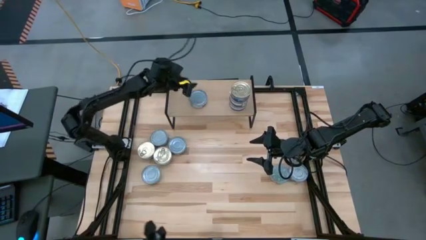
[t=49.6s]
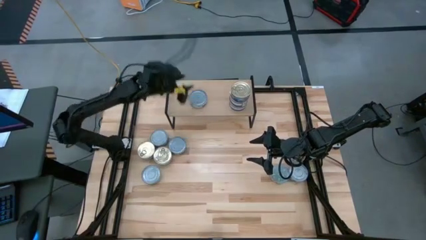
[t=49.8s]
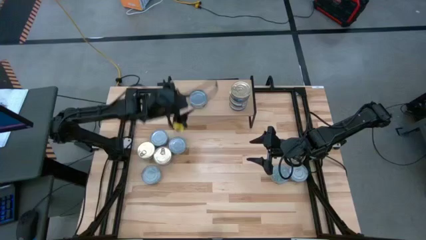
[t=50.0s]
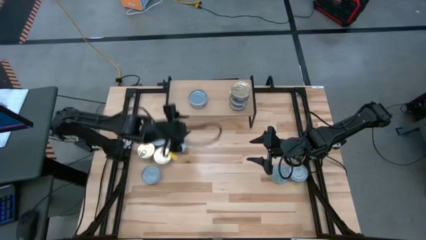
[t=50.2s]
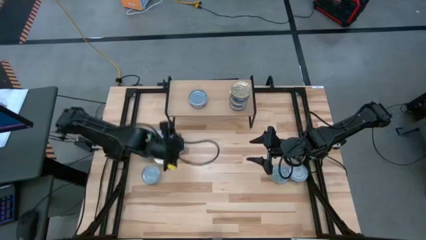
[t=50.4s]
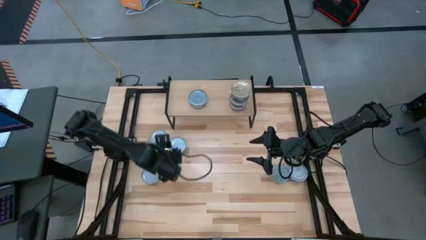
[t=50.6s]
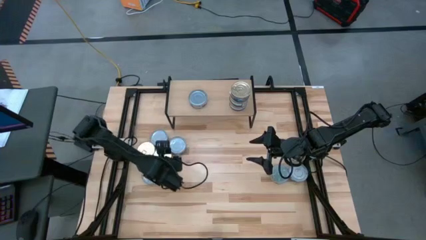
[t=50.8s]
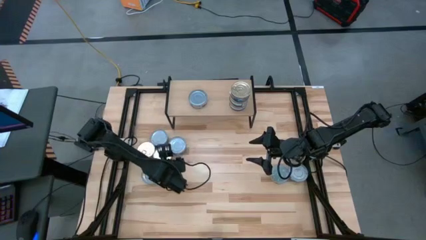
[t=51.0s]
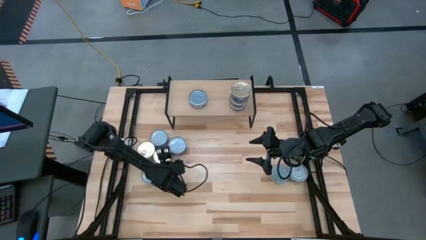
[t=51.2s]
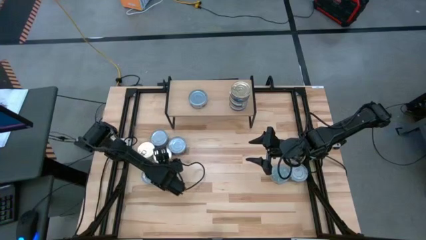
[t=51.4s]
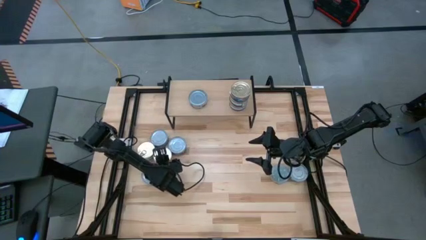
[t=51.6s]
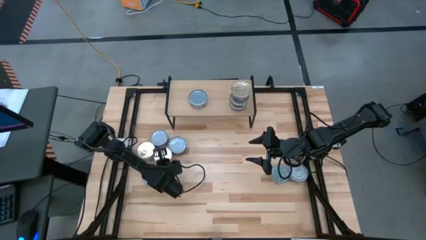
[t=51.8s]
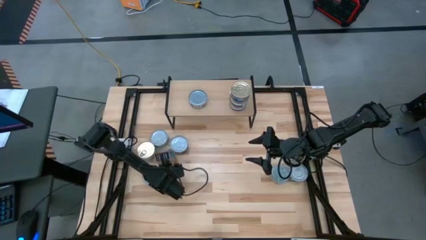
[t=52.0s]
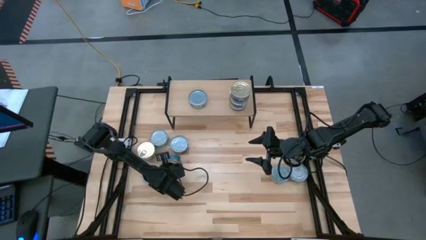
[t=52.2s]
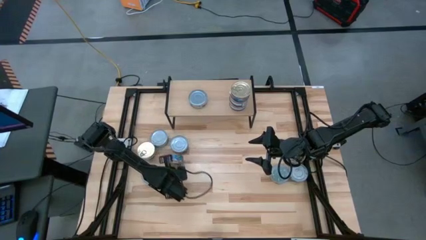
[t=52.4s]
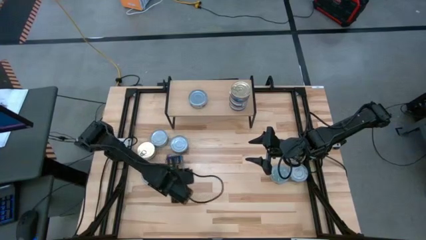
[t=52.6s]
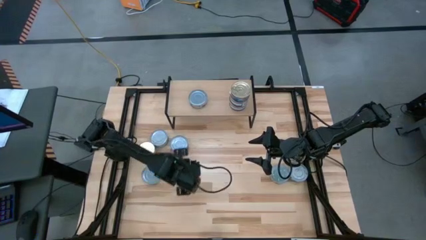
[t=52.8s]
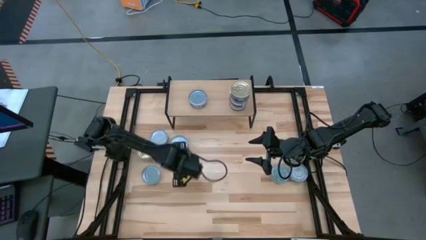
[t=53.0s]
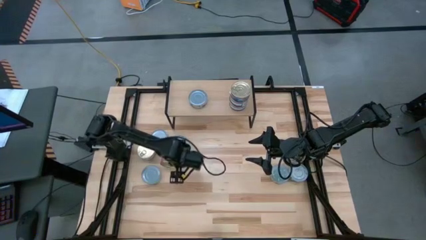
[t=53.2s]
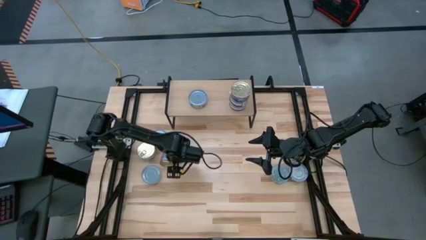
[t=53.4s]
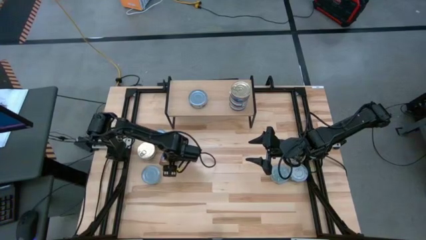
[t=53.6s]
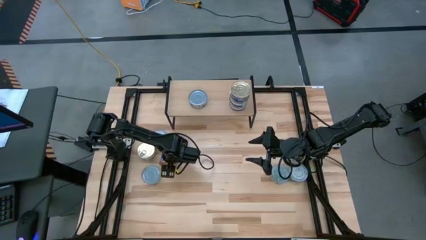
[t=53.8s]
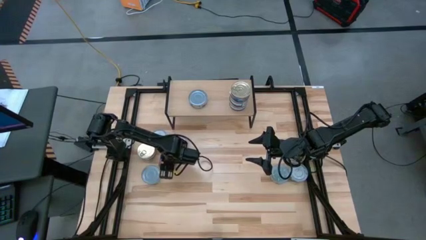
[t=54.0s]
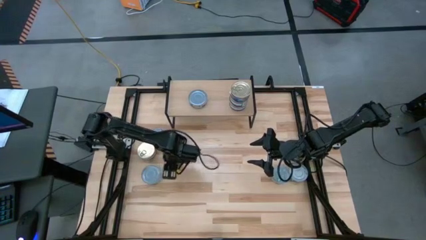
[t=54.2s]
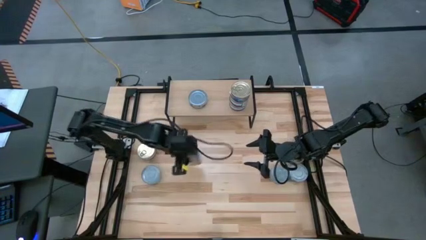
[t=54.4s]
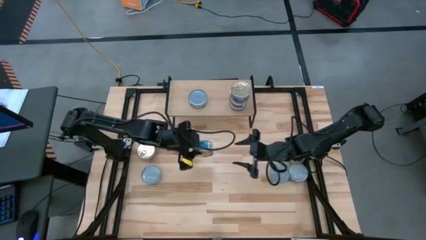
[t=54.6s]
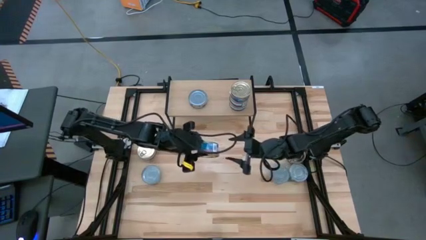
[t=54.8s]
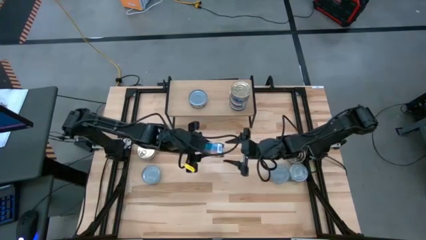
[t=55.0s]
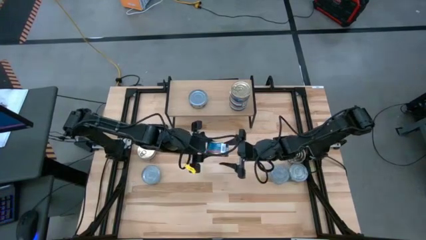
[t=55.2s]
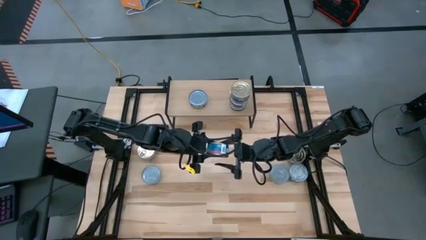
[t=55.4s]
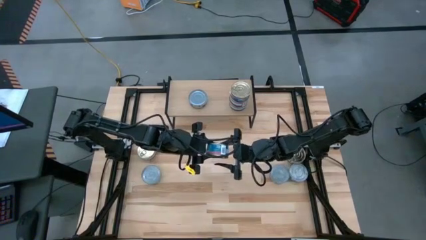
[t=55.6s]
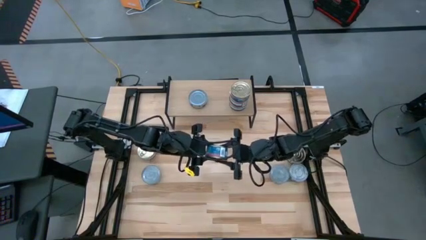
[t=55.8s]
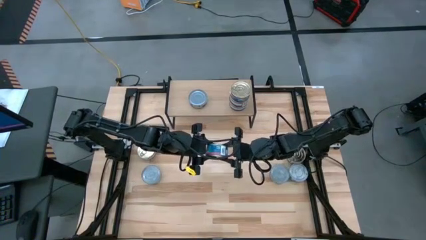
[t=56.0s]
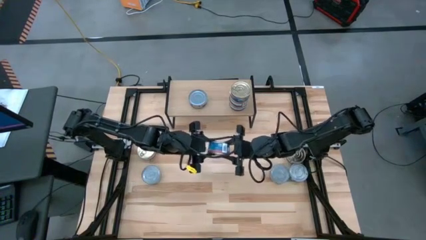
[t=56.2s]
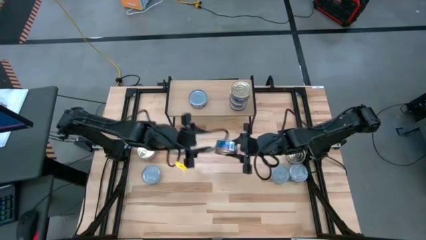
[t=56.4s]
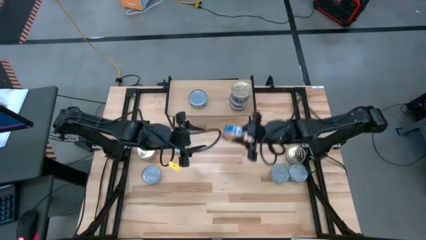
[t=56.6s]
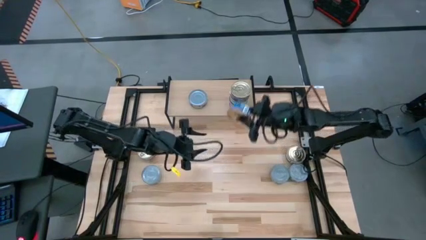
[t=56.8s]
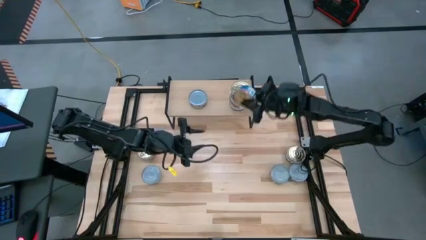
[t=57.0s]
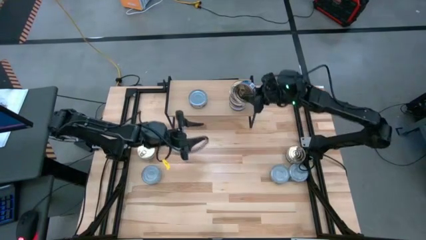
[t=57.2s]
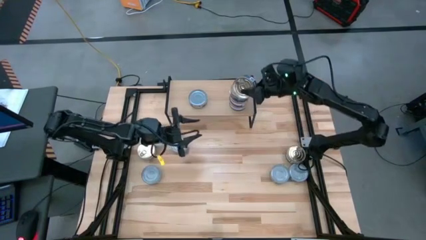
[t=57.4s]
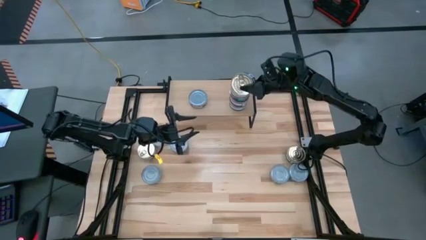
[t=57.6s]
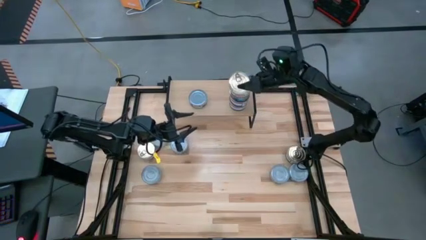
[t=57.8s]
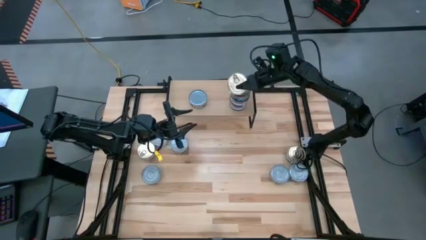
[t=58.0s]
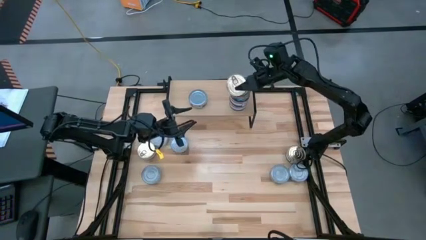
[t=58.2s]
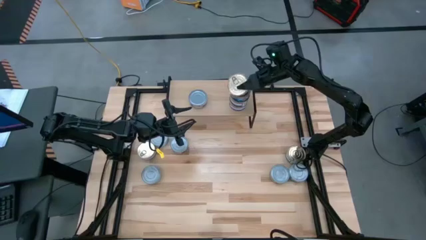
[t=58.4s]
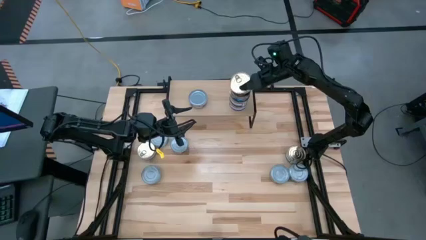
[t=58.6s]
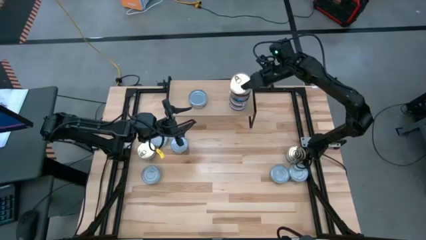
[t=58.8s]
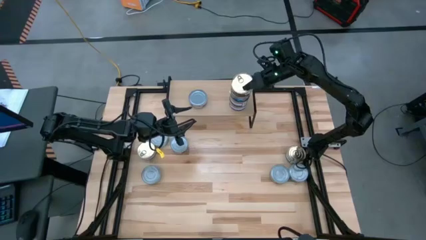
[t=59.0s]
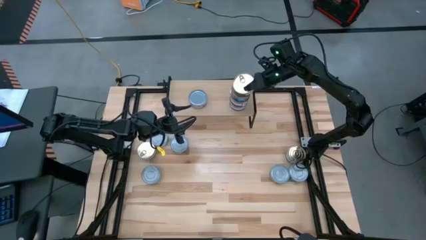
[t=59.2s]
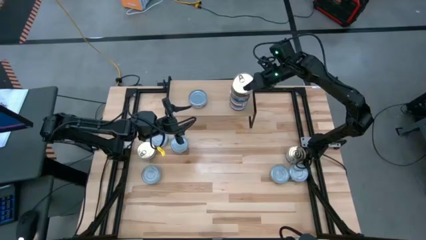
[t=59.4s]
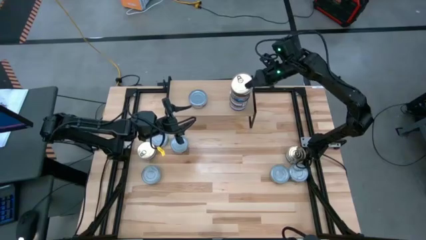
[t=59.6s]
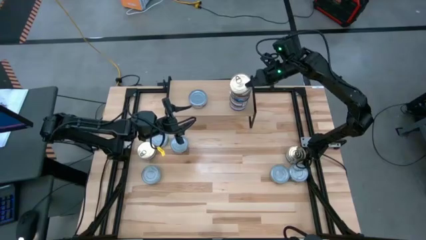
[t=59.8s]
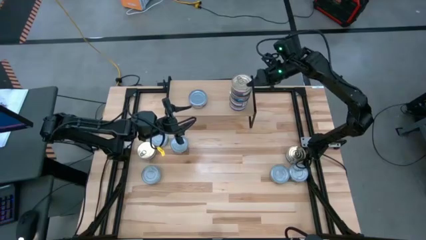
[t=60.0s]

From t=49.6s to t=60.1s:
Task: Stack canned seafood by type on shelf
Stack the pink and blue tuna can on top of the pink and blue tuna can on the shelf

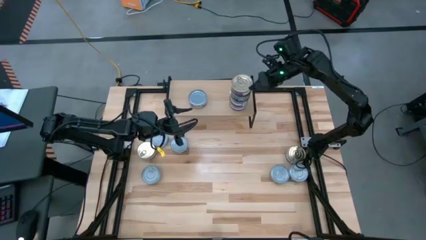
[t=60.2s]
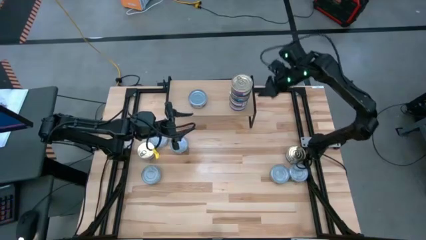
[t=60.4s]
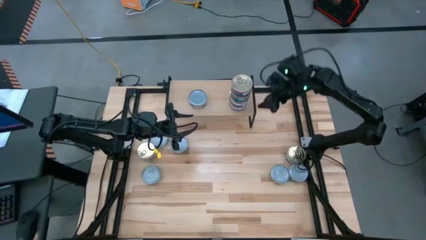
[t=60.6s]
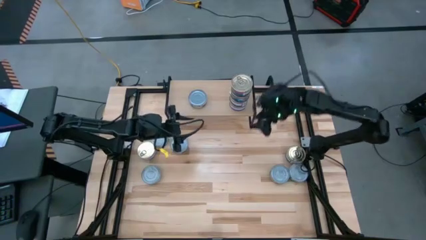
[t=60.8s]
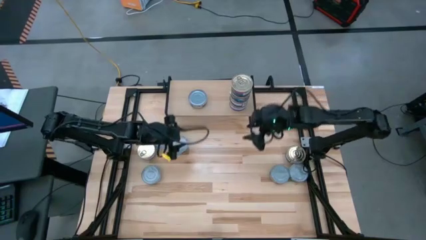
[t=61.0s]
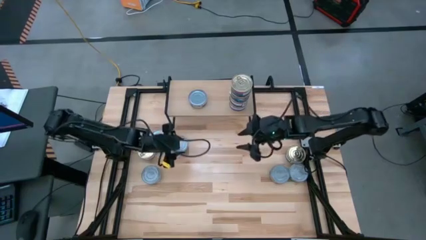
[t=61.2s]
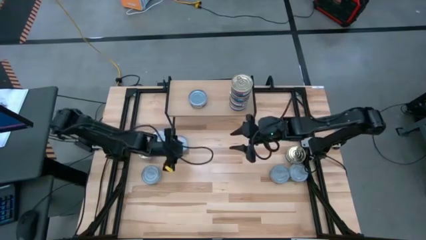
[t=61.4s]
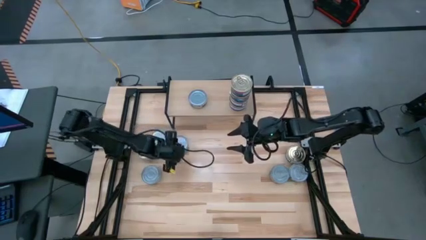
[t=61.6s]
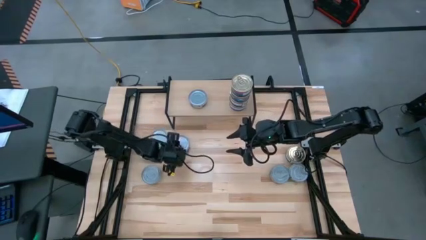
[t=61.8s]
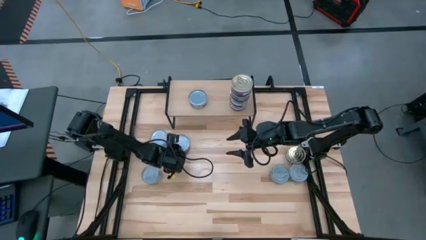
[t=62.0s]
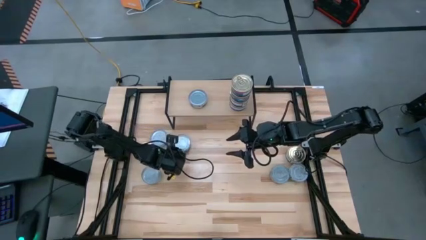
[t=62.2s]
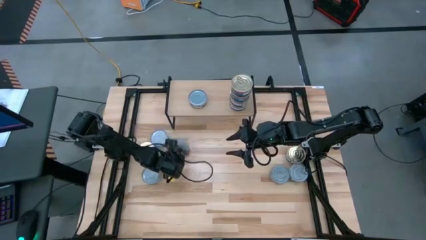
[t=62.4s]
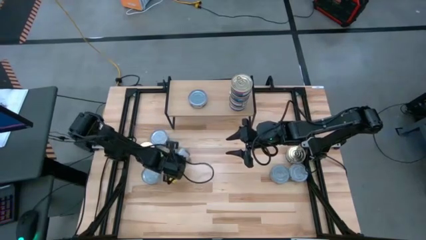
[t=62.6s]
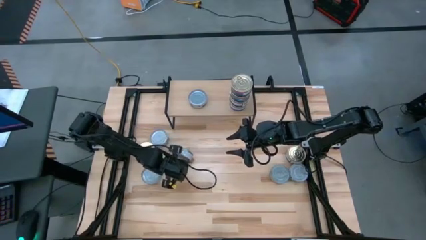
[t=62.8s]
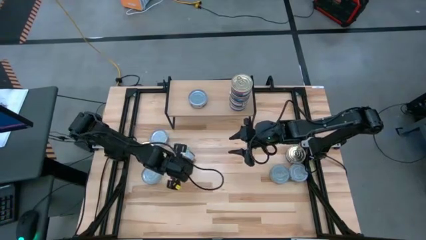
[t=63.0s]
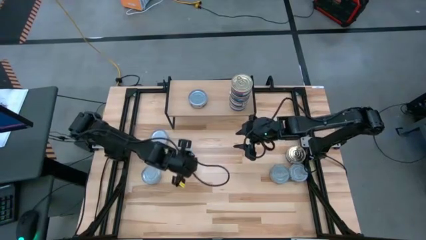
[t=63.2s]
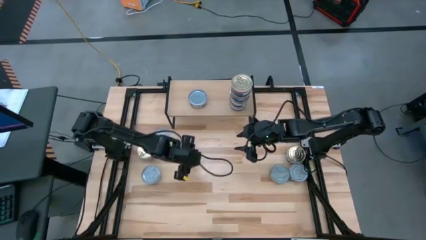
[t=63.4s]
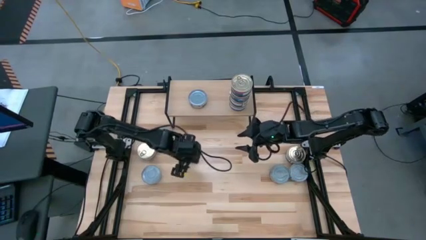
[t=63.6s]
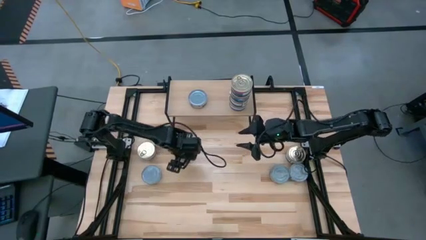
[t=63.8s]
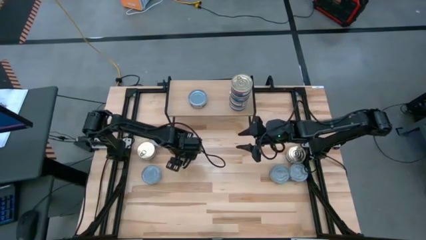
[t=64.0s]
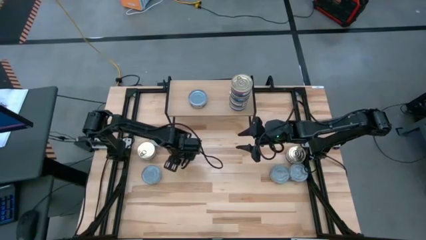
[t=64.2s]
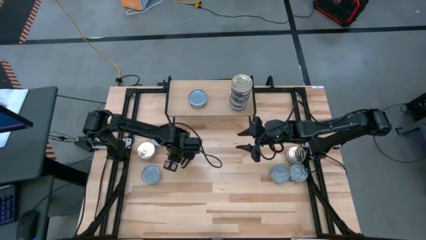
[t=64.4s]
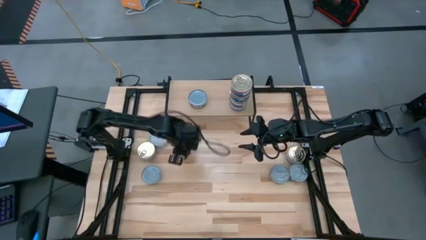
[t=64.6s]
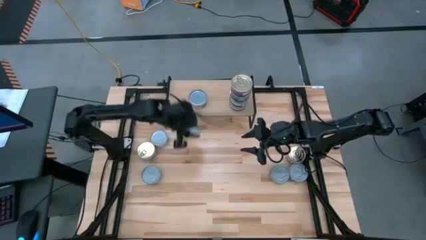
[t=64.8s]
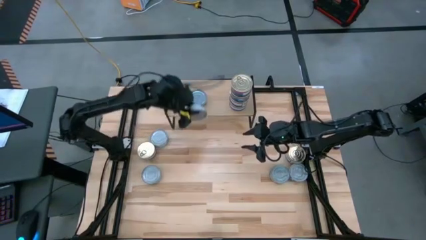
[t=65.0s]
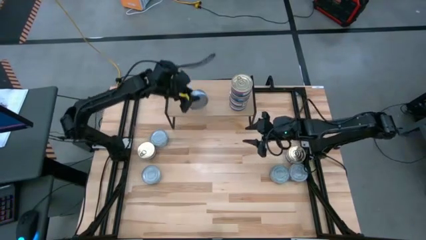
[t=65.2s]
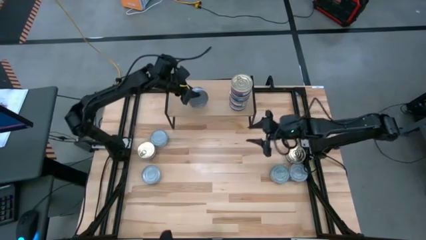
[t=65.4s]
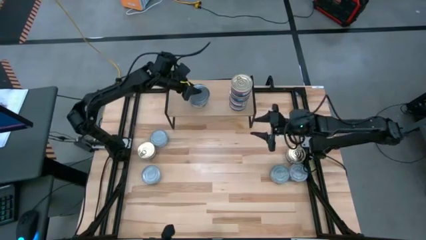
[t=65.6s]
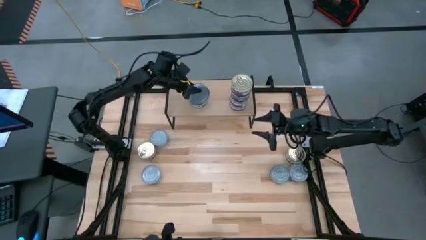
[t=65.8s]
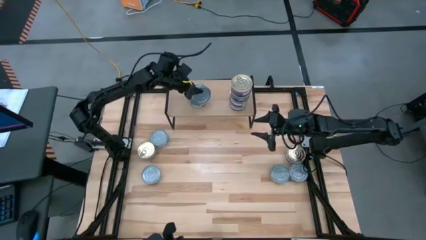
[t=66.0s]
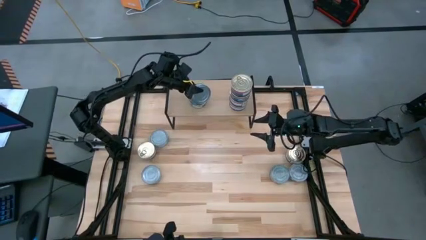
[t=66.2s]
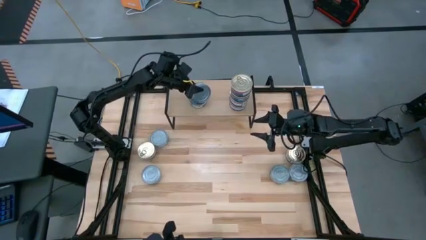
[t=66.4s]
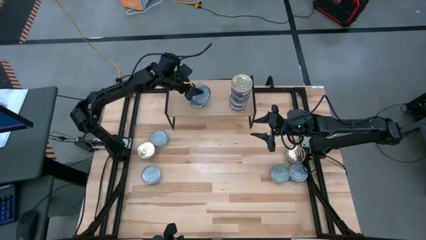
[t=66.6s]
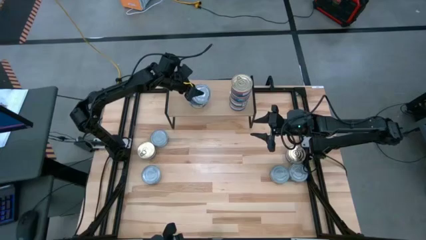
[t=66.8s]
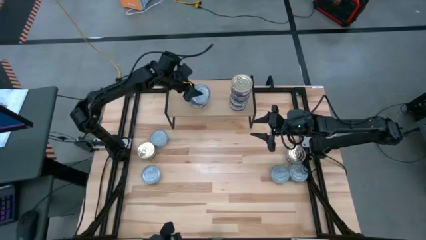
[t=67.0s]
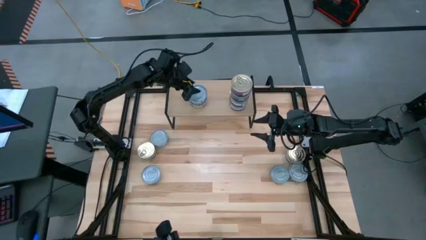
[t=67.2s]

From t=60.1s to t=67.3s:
Stack the green tuna can on top of the green tuna can on the shelf
